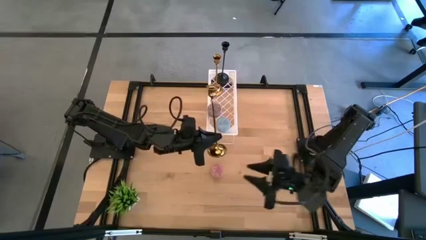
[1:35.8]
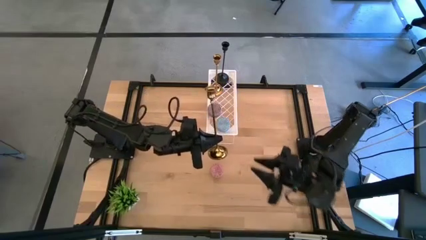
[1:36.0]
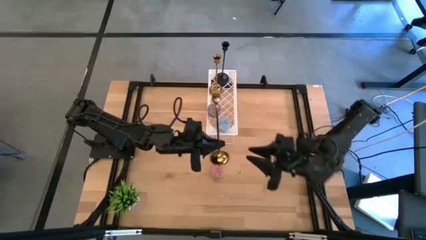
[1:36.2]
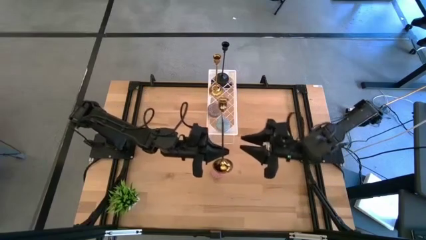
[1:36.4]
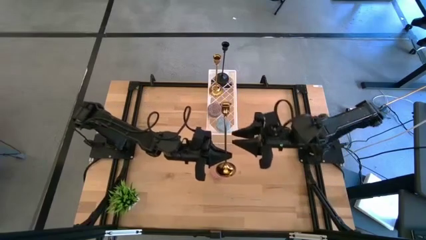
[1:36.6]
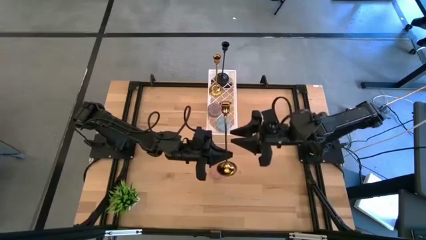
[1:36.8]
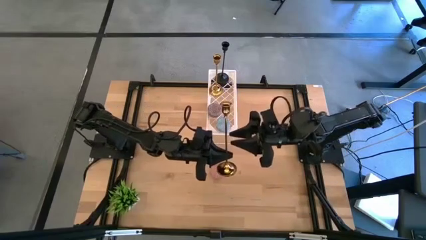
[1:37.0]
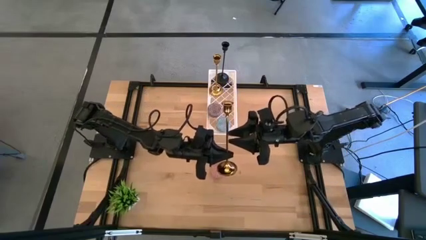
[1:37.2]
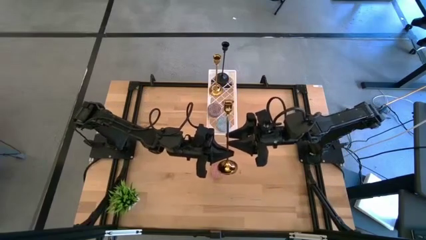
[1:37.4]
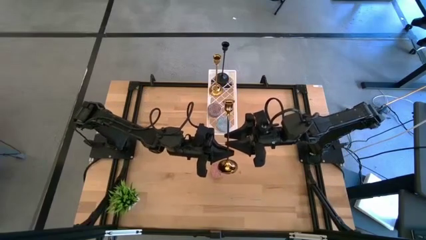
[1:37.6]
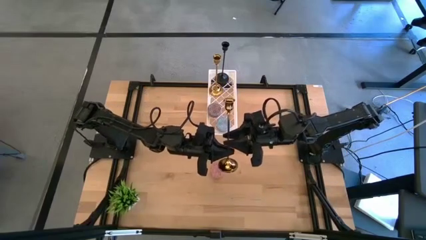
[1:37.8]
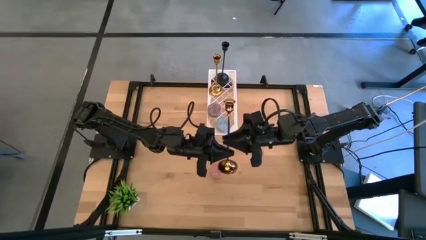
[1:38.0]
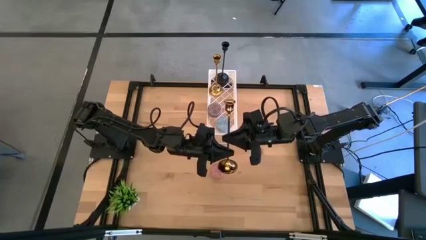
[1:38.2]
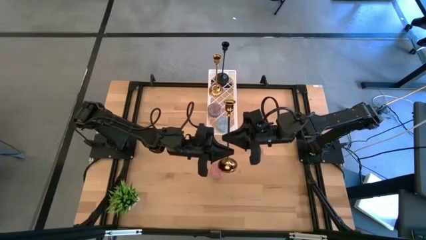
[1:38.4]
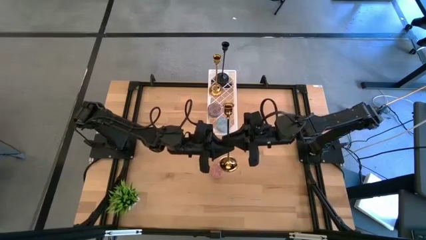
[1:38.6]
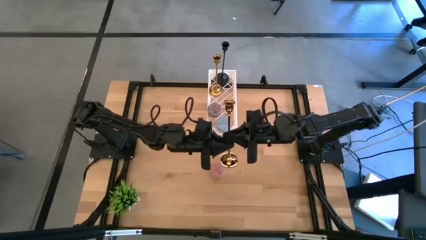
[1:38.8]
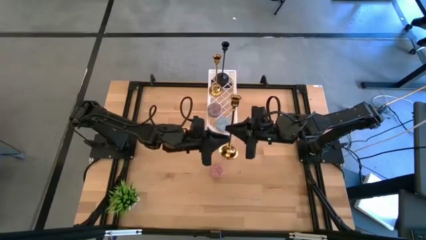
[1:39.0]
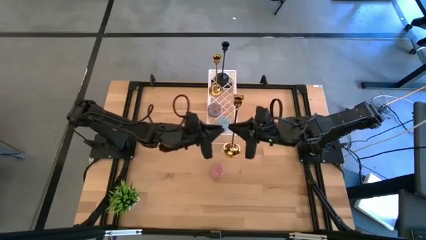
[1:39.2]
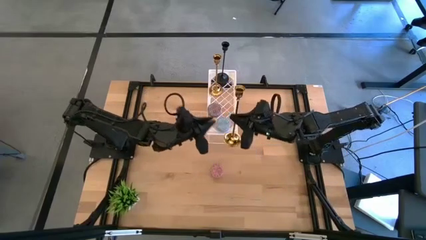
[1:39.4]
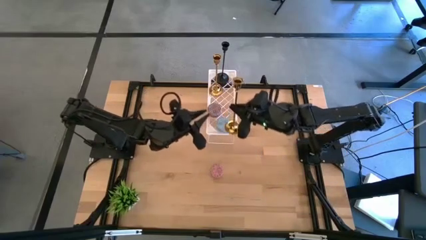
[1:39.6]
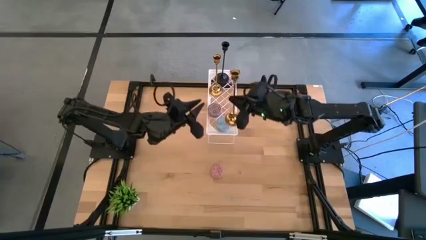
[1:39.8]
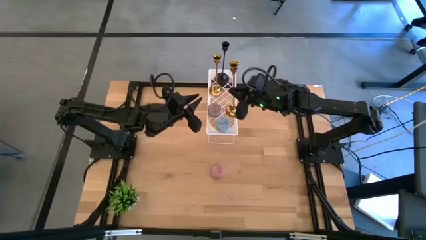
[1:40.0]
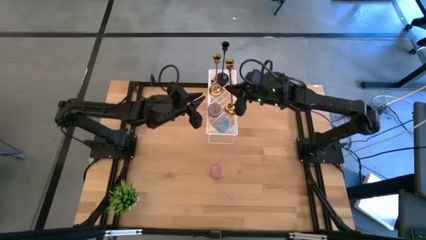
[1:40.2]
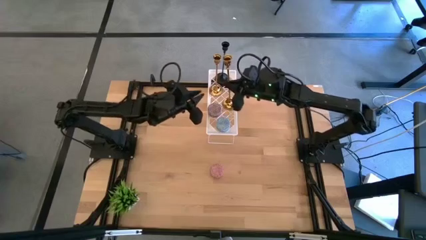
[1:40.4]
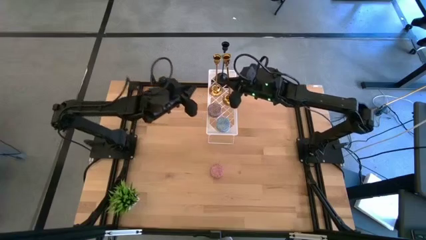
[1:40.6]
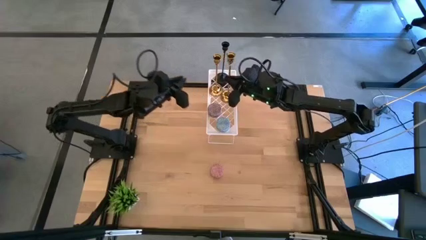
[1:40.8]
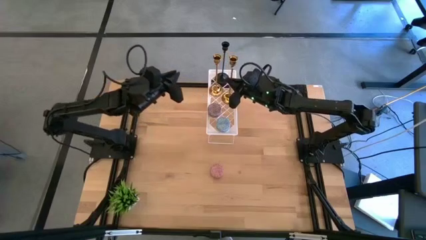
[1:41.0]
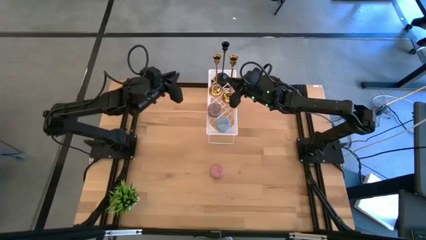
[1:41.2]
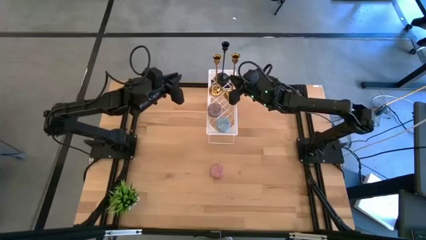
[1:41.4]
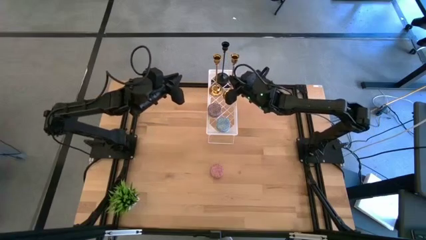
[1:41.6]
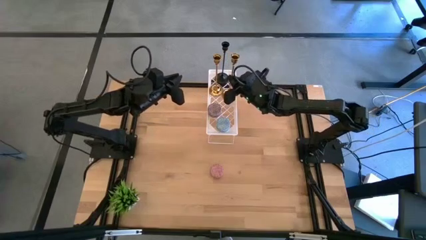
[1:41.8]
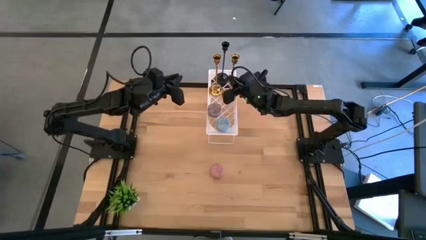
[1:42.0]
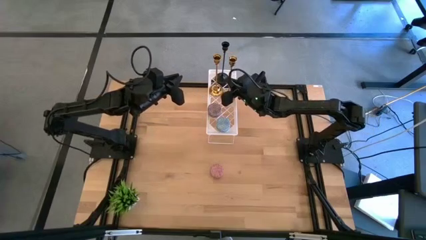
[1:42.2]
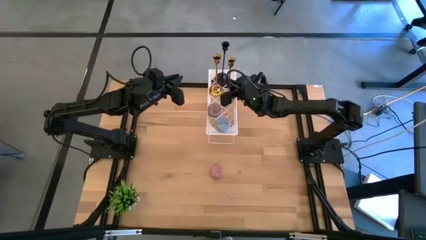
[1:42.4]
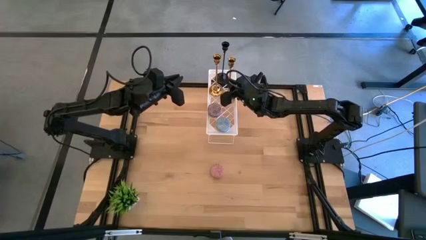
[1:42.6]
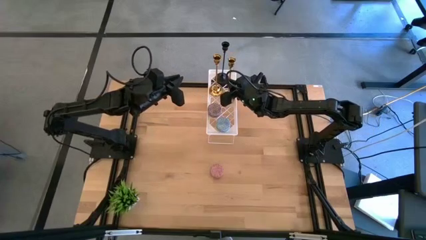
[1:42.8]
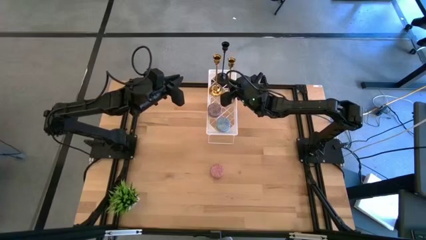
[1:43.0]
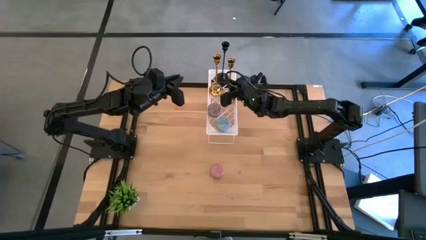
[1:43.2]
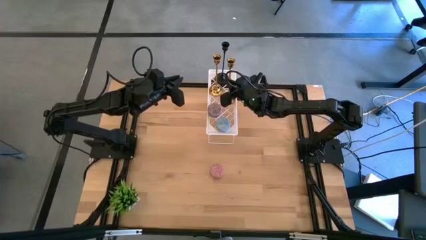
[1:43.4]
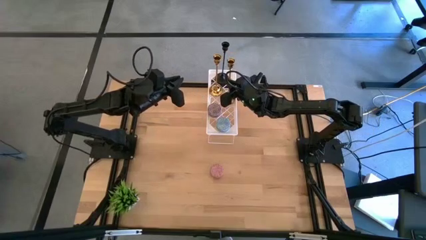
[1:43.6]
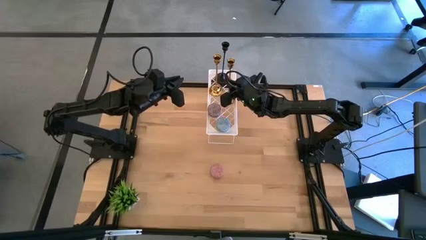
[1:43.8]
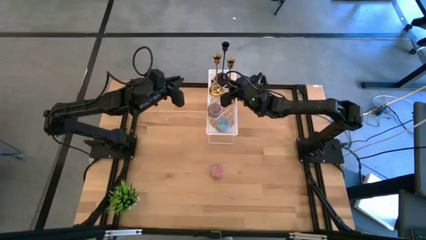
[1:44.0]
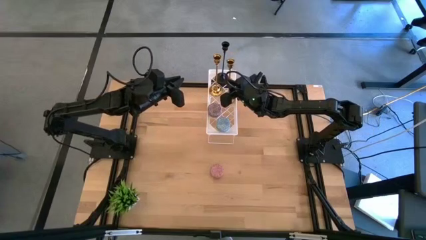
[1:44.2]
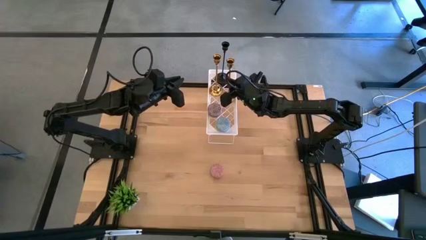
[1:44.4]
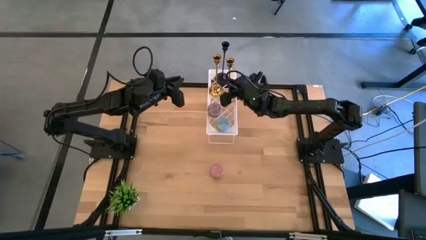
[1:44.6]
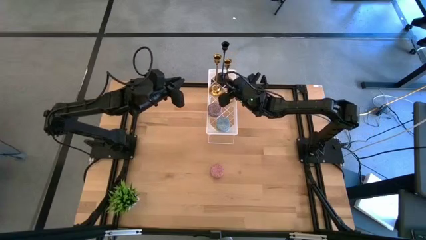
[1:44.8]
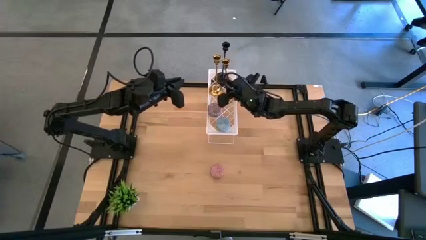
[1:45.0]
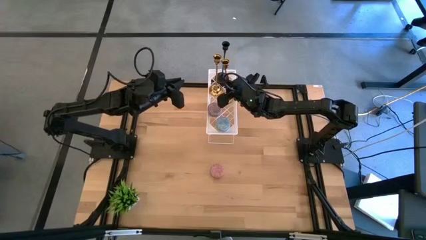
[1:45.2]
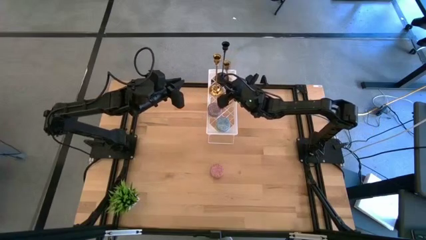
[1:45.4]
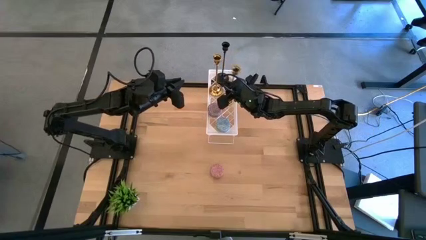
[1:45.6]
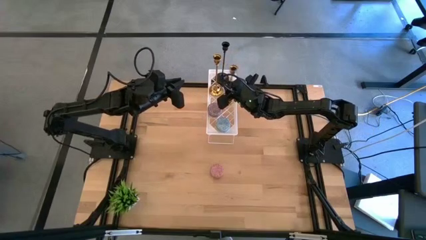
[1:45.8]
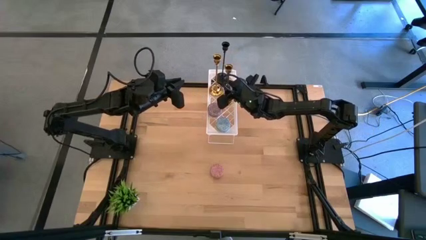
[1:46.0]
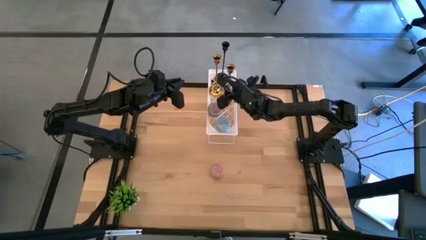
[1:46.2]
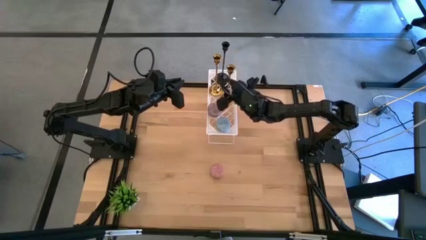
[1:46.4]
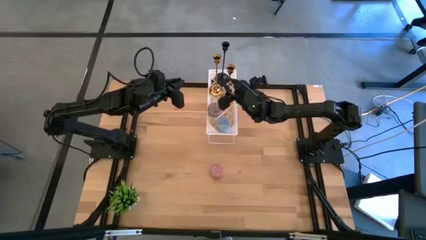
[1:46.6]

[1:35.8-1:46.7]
Task: Pick & Place candle stick holders
Put the gold candle holder on the shelf
